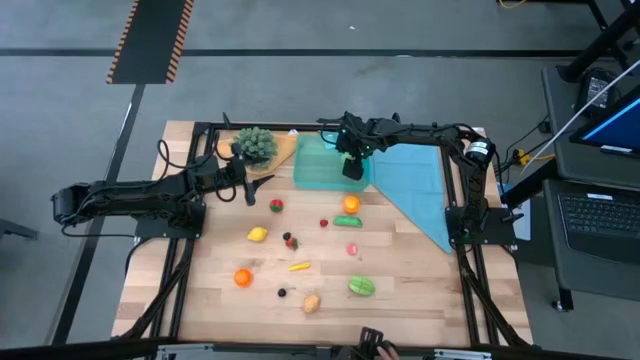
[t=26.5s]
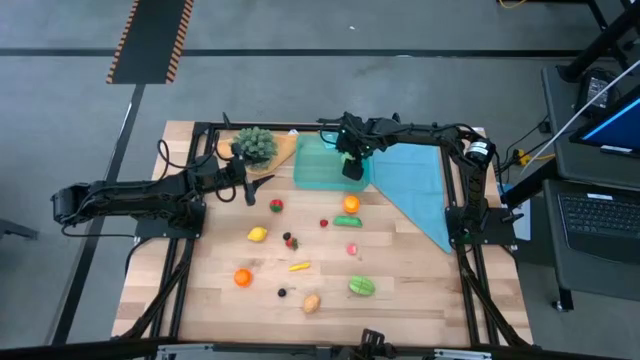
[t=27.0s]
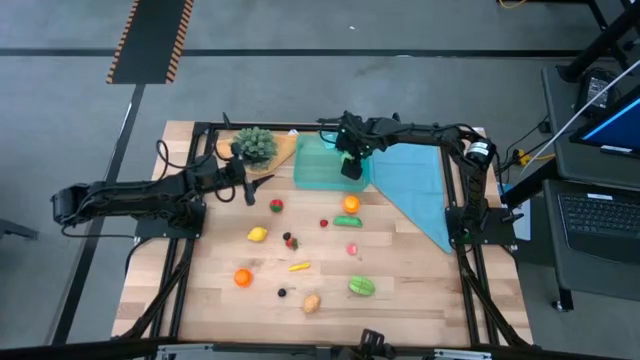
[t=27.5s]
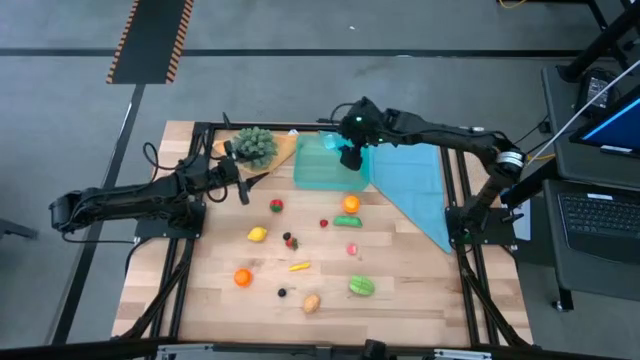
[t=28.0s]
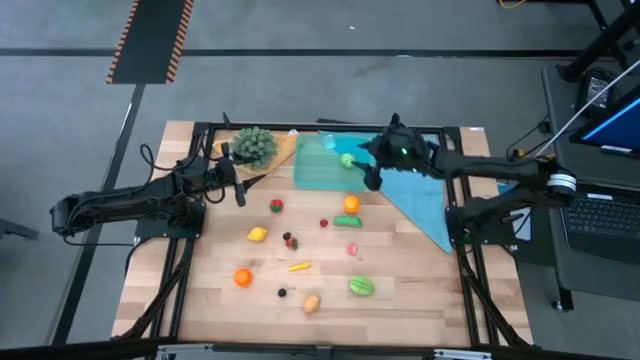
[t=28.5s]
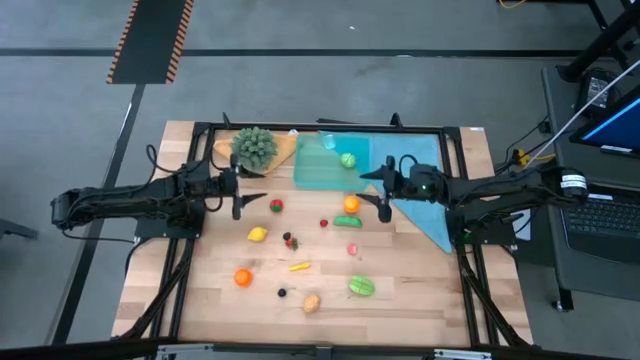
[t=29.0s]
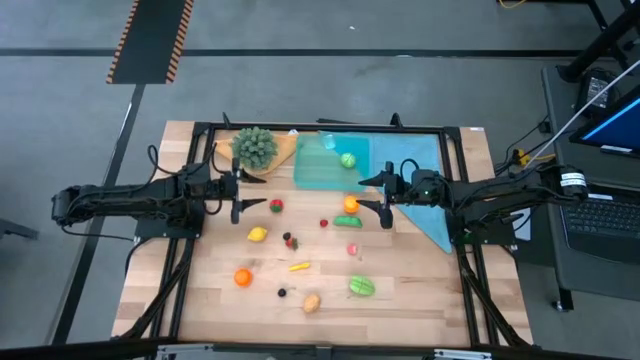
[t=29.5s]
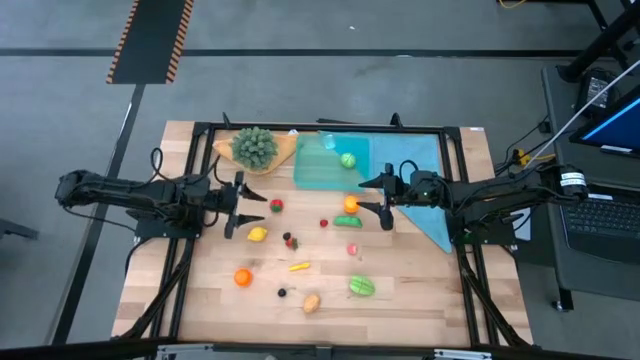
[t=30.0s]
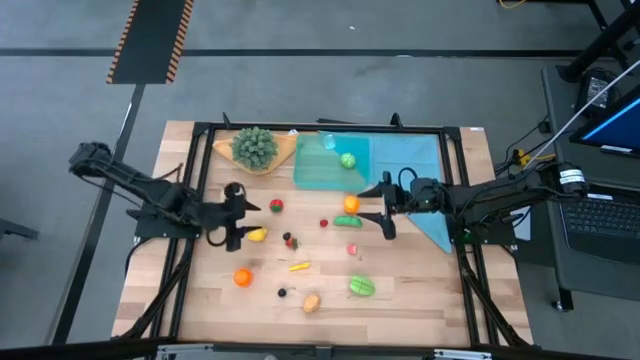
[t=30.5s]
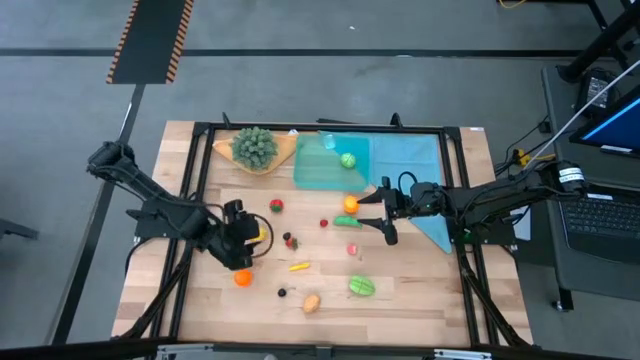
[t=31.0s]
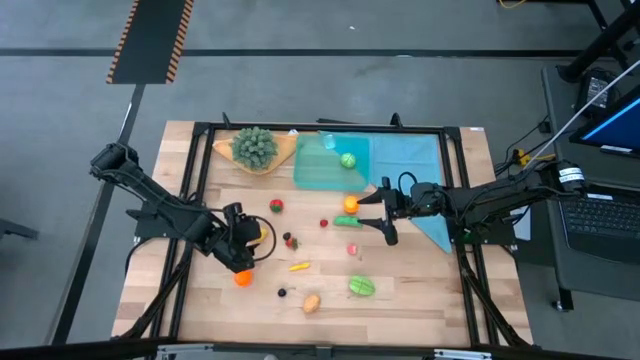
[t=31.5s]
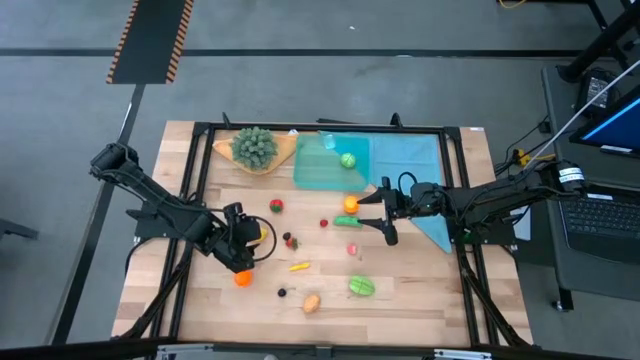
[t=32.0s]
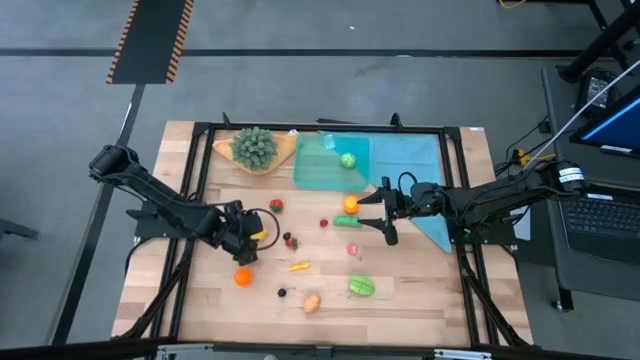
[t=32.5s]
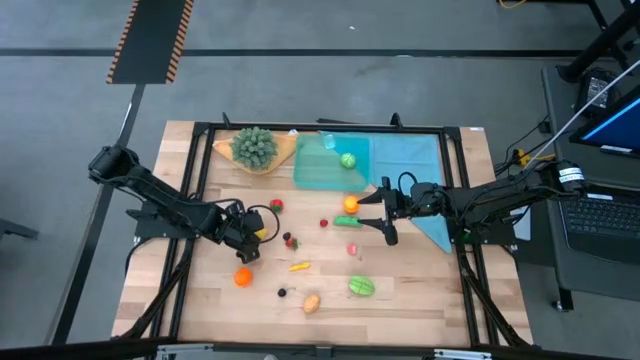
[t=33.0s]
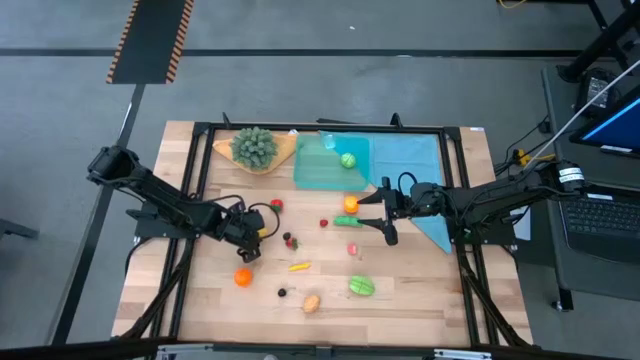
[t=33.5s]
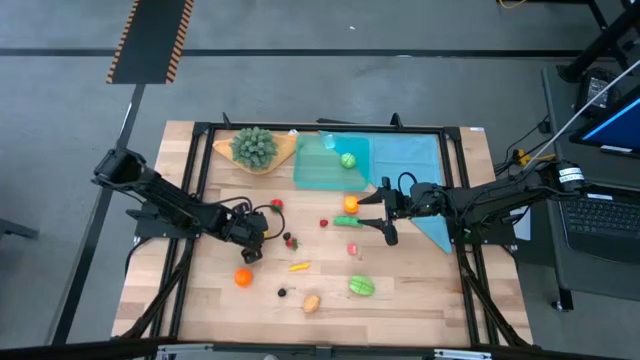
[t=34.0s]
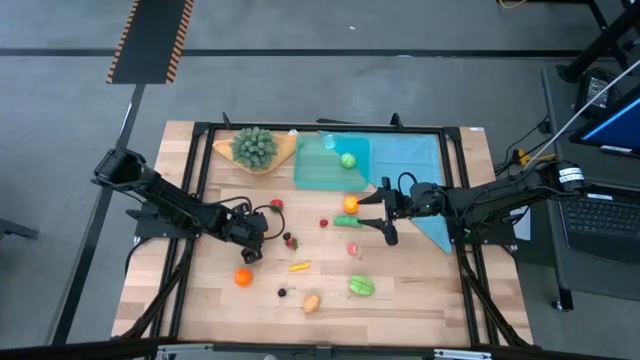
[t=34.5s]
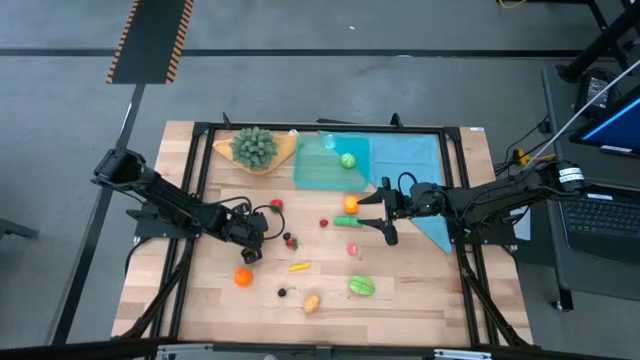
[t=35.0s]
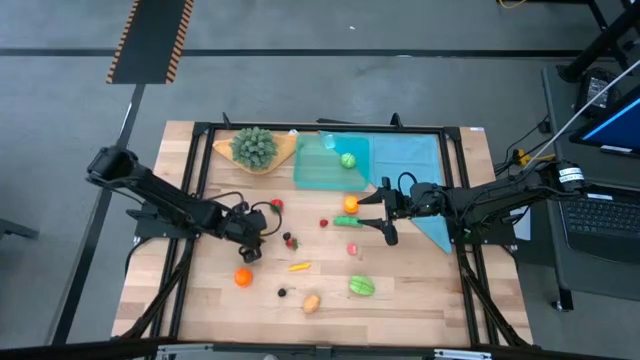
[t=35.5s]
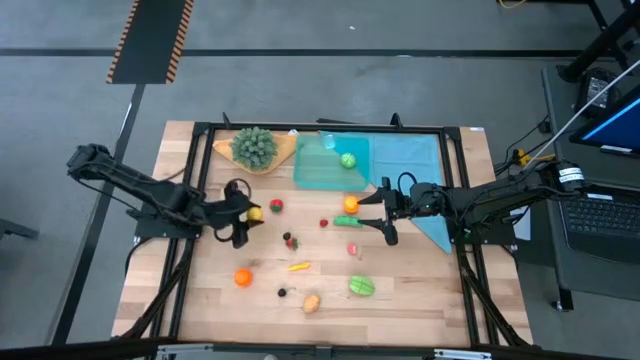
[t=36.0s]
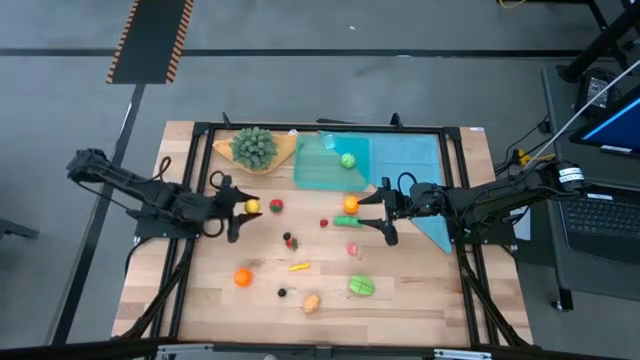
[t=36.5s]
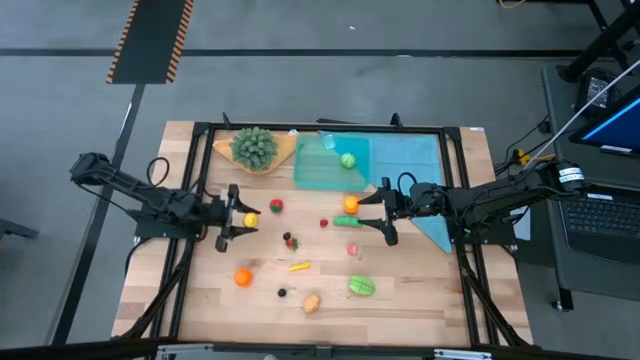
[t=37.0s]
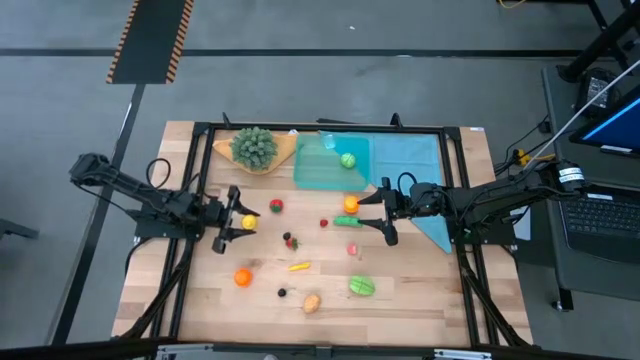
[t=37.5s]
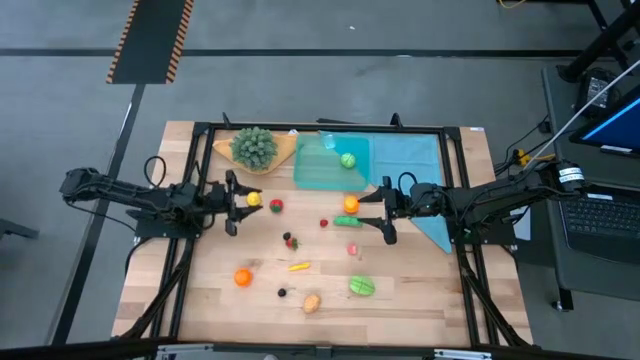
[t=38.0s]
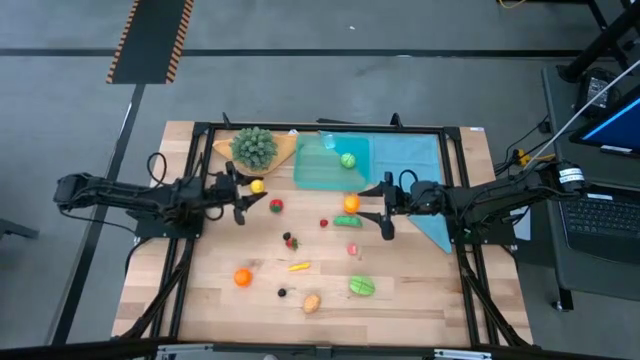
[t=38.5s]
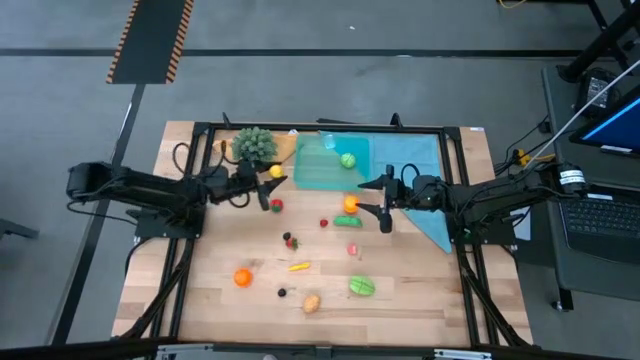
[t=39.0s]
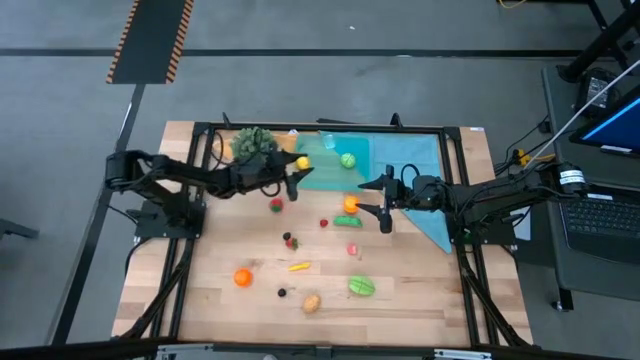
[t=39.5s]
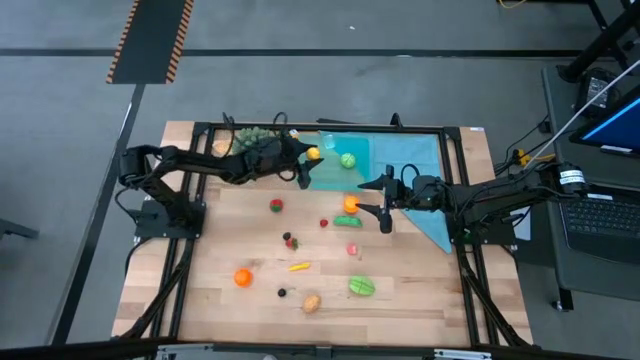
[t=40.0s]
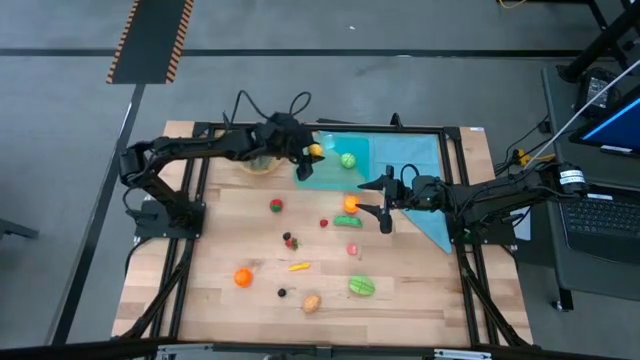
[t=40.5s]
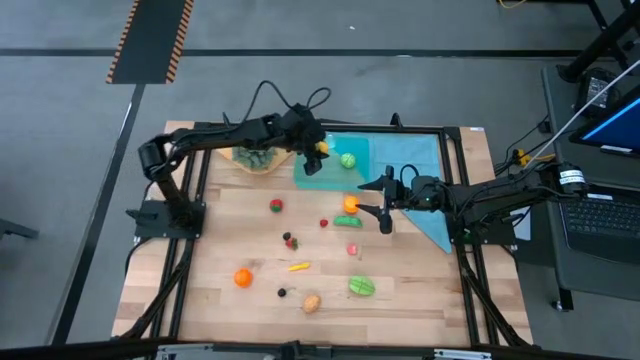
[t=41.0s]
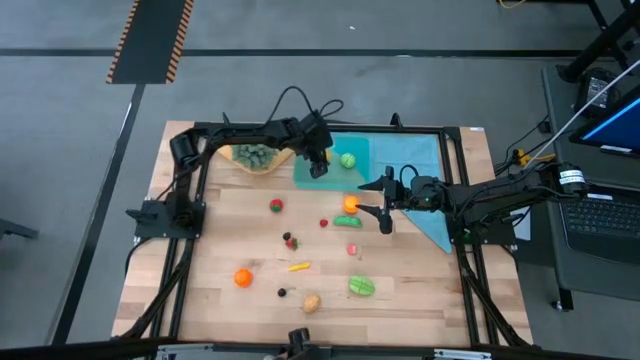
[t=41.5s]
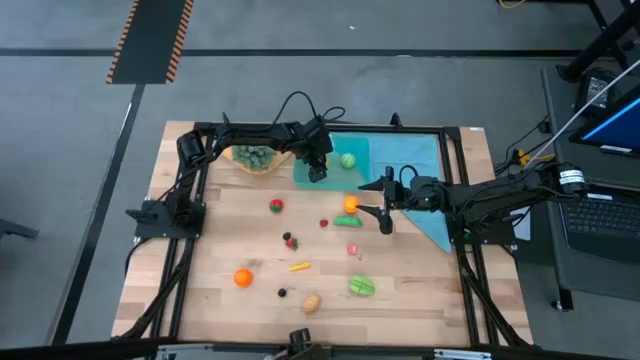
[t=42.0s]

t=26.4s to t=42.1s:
Task: Pick and placing Produce into tupperware
Put the lemon into the blue bin
